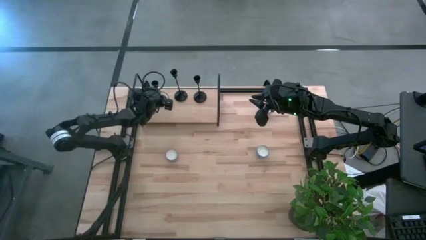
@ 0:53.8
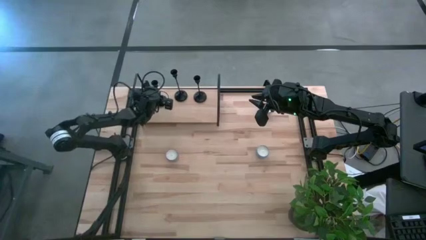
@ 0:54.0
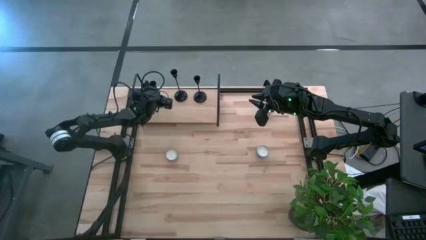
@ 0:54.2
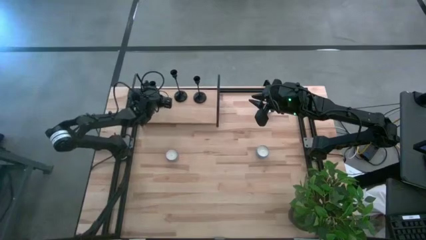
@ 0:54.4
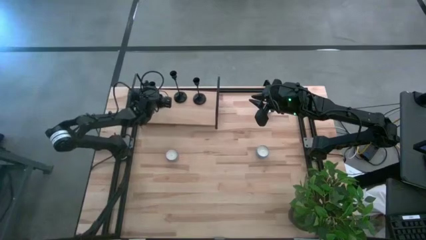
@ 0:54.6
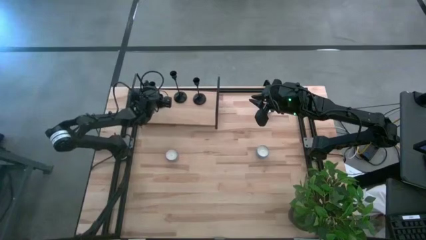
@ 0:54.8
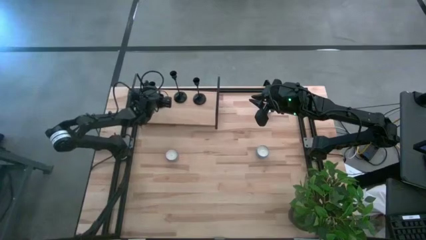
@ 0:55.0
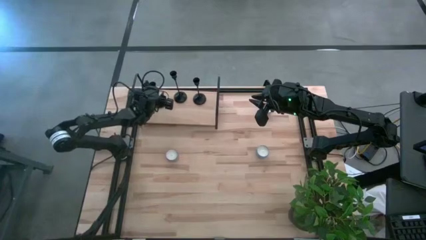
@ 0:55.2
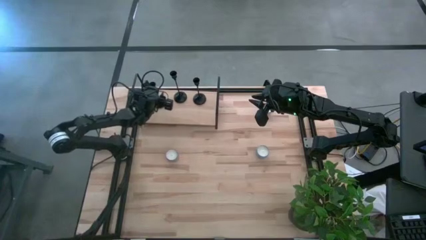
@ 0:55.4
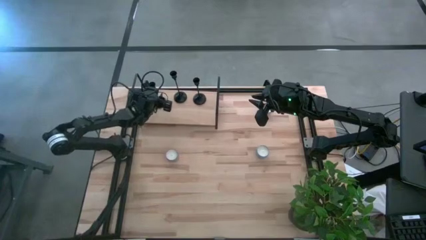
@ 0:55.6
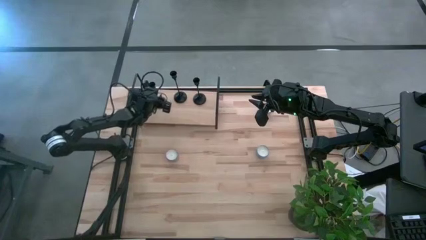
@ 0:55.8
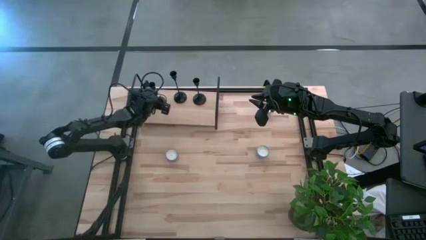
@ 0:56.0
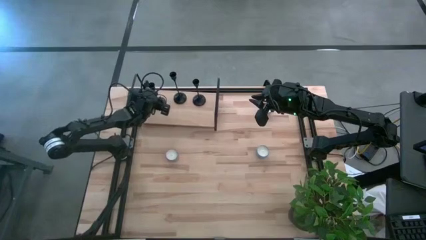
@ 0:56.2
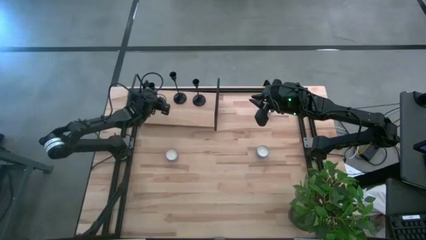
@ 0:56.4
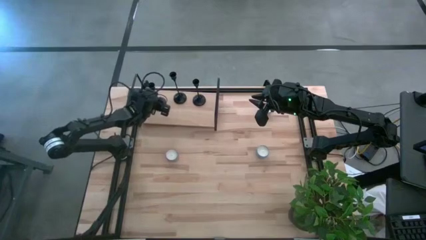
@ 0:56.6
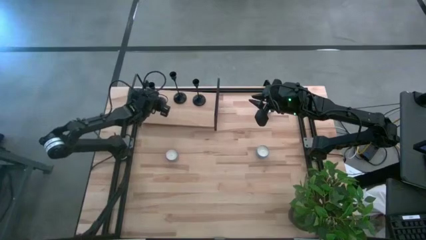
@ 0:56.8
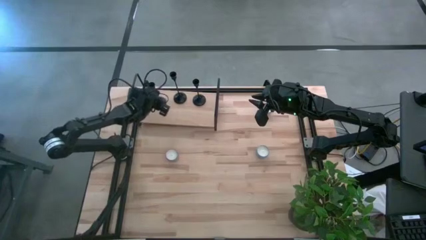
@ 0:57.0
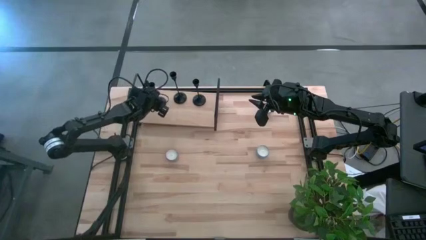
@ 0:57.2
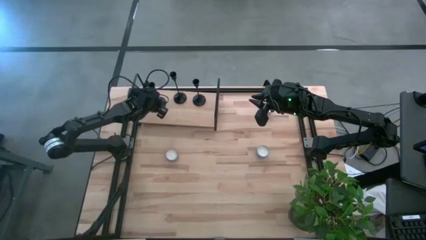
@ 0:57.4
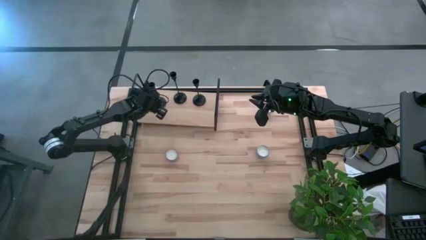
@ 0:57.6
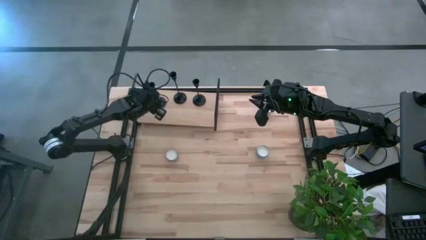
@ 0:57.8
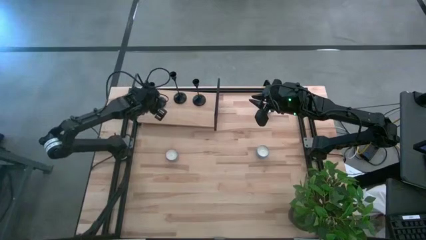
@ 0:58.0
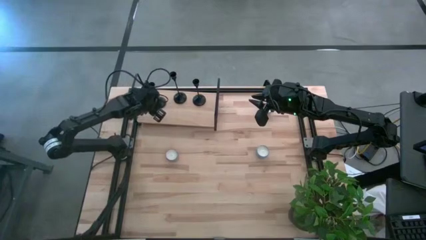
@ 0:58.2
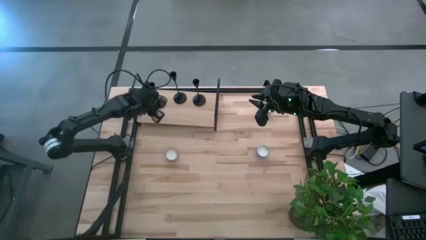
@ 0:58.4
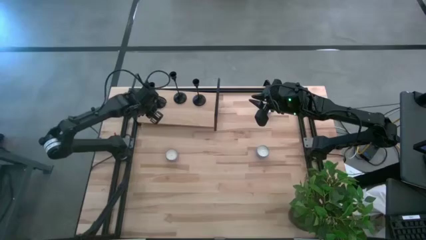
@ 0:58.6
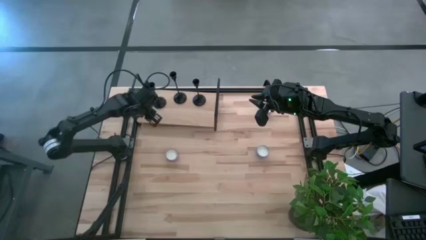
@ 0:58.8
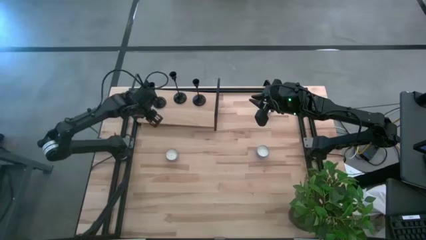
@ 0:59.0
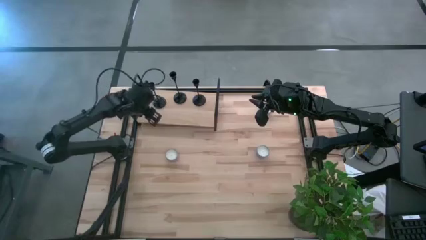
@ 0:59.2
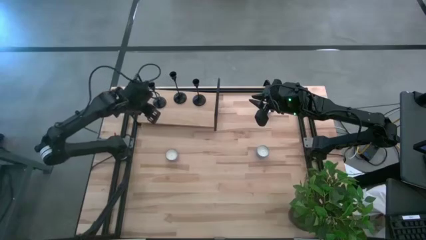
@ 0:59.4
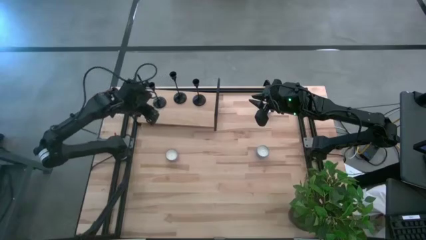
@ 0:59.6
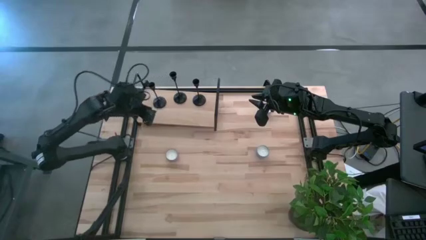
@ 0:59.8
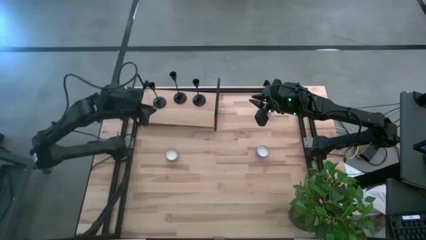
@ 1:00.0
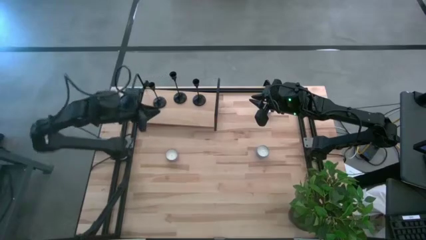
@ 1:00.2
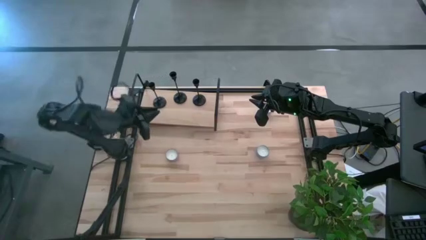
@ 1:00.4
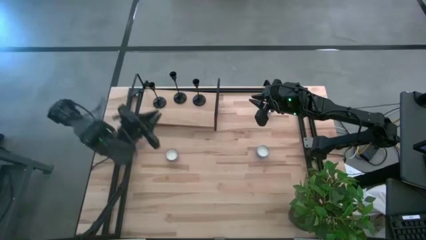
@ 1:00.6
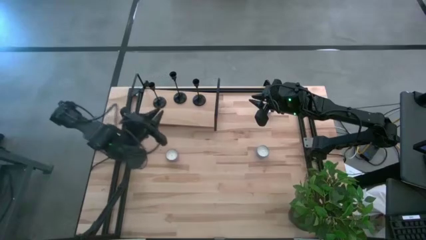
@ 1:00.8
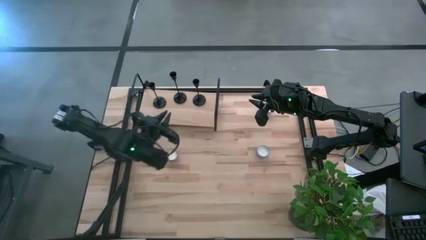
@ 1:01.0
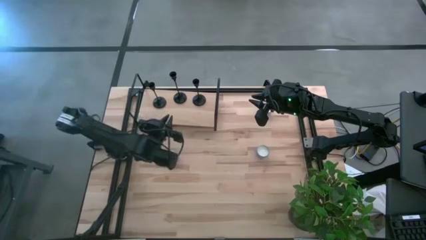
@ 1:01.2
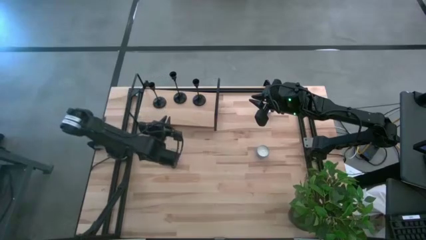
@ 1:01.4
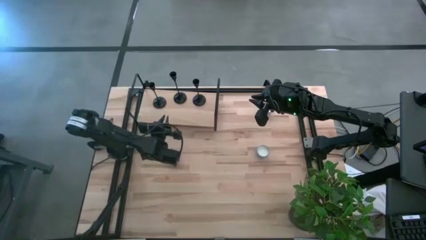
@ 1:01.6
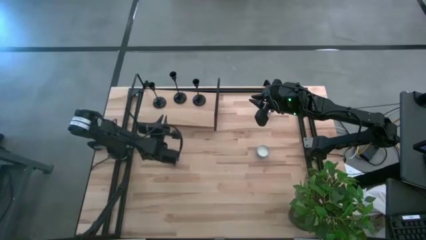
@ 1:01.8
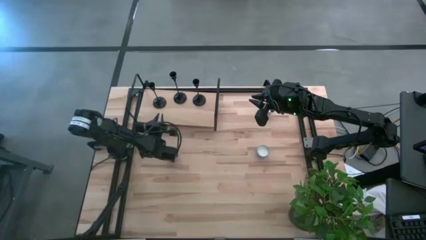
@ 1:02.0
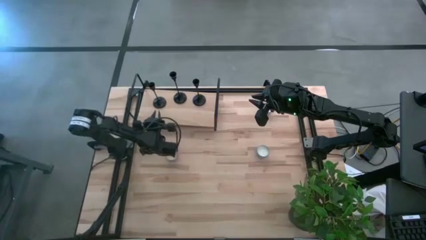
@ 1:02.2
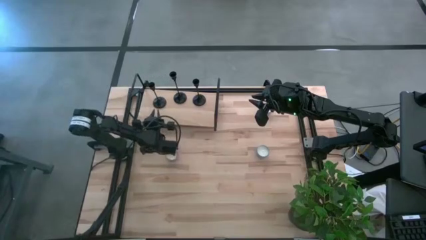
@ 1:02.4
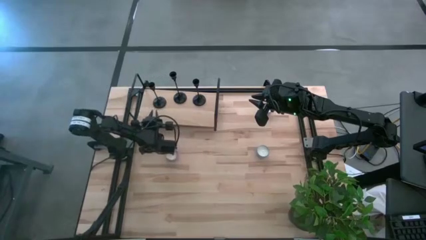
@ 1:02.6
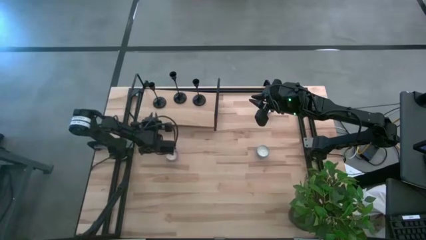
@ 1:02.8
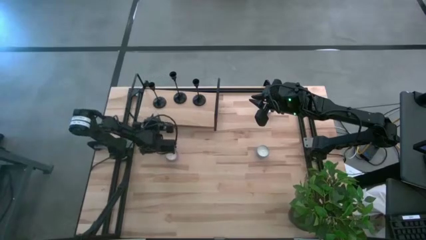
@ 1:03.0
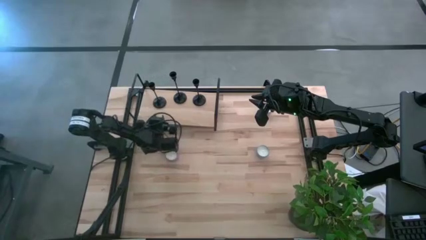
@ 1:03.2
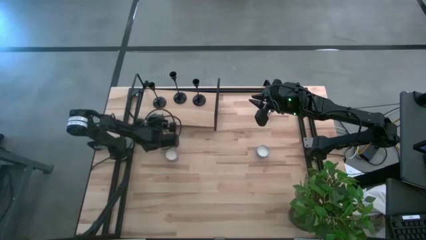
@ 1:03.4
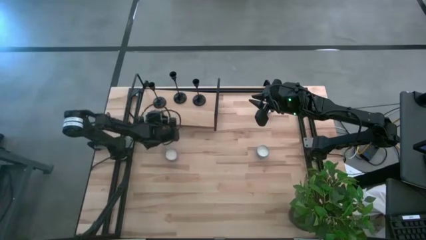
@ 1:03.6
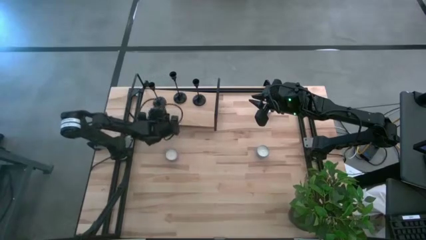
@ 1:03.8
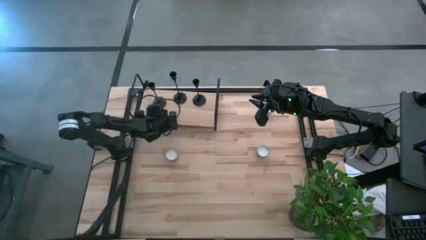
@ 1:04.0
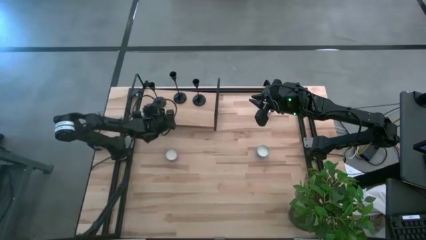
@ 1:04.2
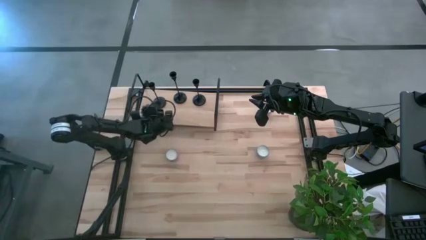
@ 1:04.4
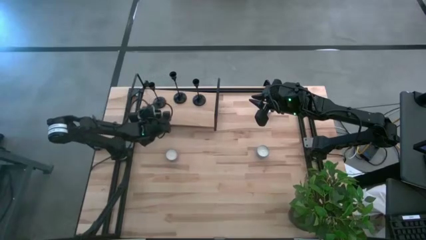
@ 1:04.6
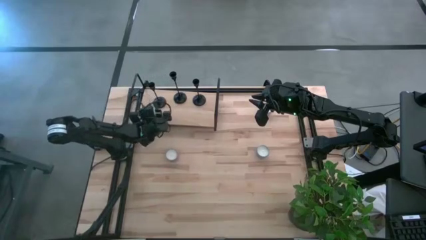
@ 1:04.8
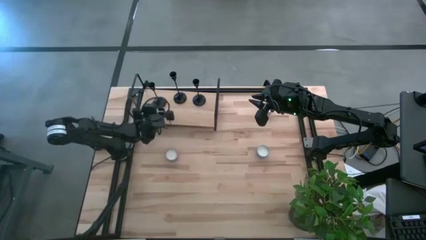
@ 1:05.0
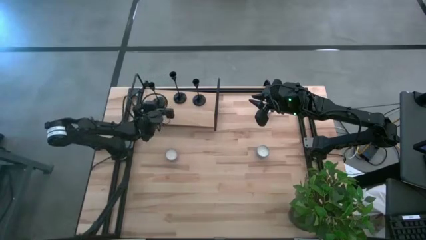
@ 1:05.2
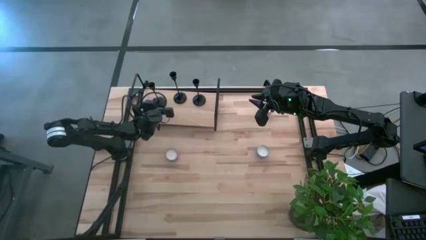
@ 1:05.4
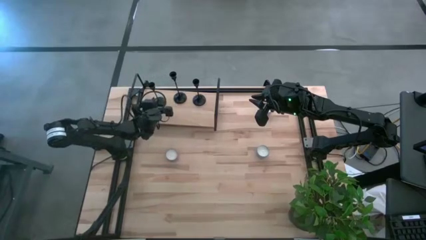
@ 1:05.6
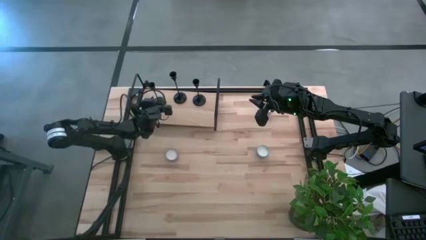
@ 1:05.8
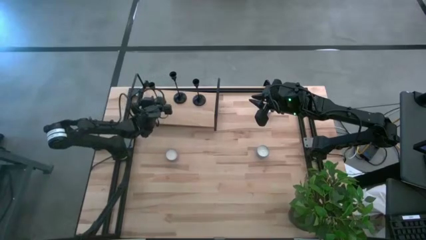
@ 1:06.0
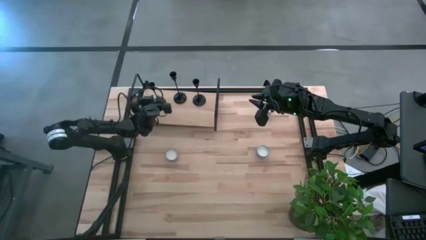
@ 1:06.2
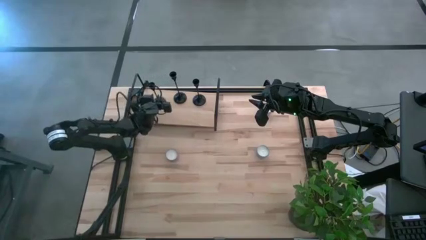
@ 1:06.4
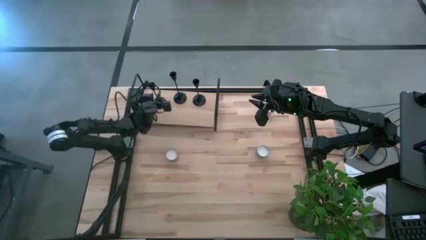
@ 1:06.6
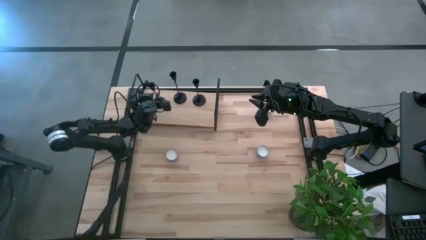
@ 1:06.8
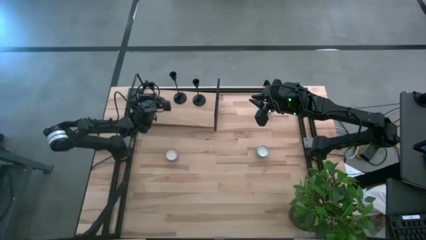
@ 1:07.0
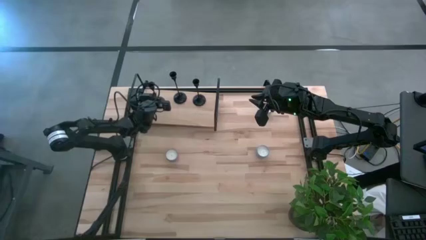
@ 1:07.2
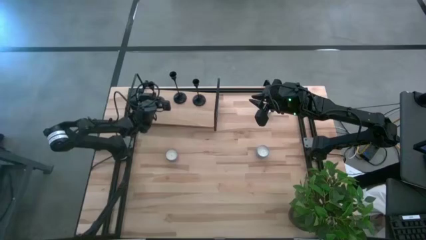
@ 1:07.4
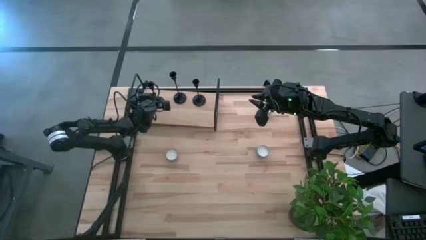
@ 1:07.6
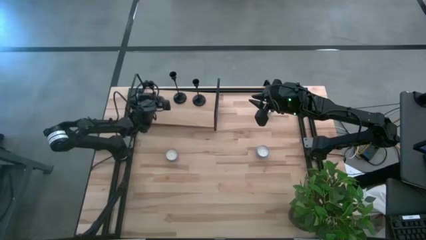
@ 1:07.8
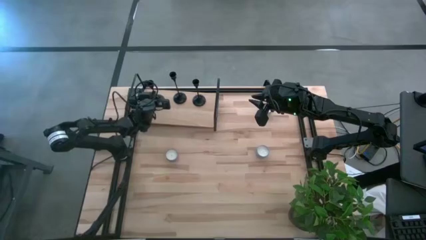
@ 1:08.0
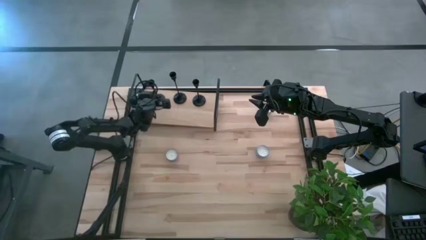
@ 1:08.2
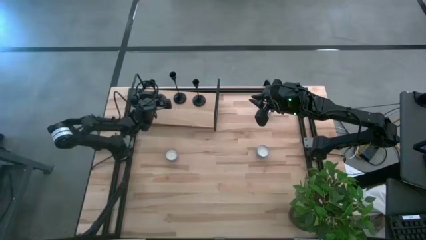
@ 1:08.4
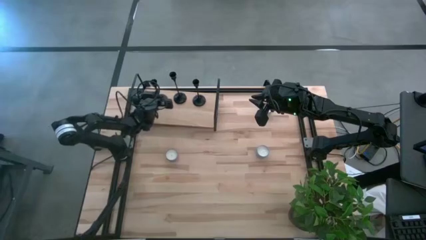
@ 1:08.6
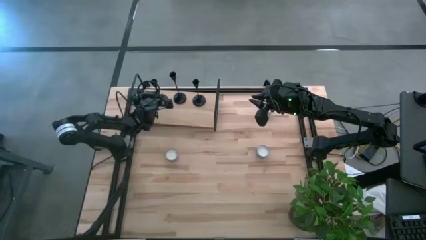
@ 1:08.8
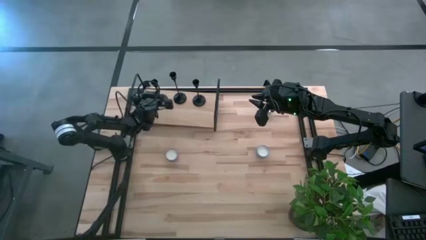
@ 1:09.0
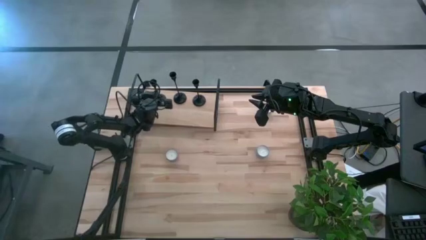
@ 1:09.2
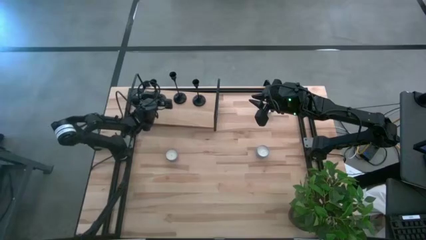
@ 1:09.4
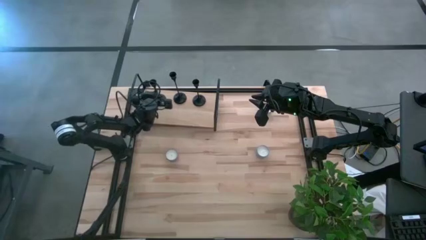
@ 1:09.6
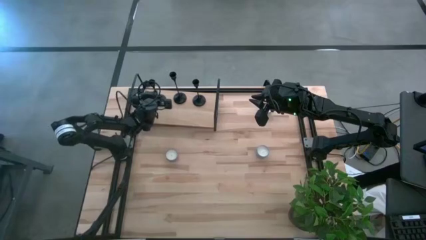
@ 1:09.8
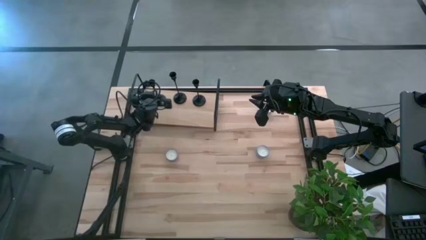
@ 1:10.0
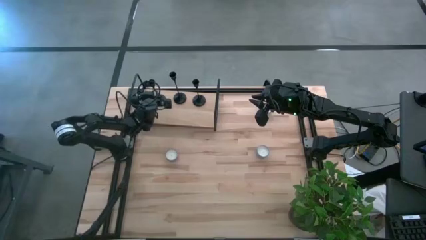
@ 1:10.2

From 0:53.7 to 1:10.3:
Task: Pick & Place candle stick holders
Align the black candle holder with the black candle holders on the shelf
